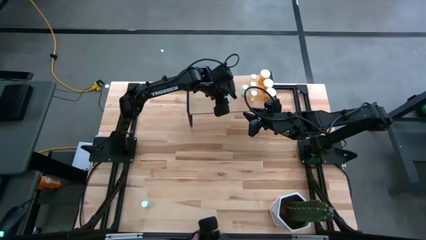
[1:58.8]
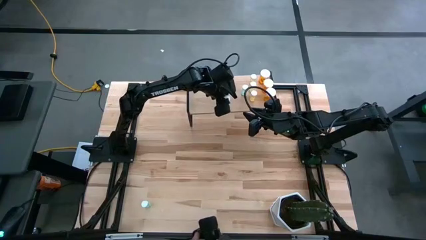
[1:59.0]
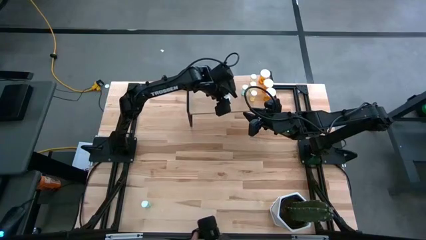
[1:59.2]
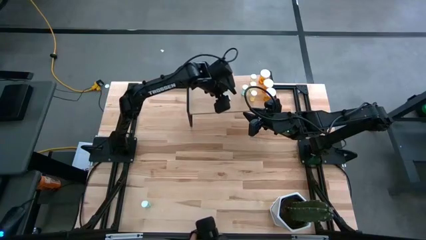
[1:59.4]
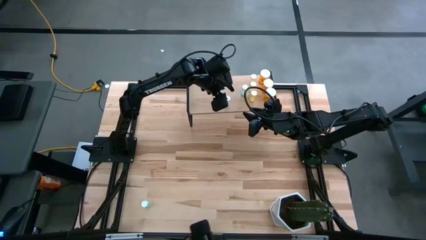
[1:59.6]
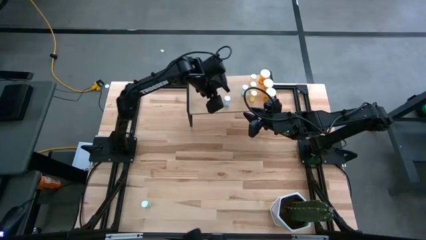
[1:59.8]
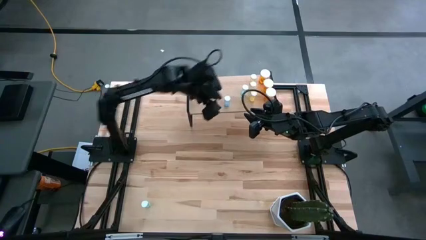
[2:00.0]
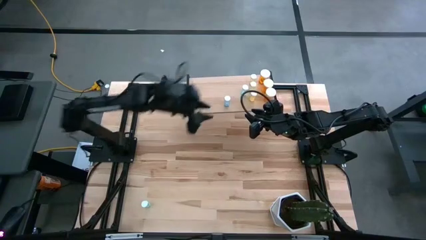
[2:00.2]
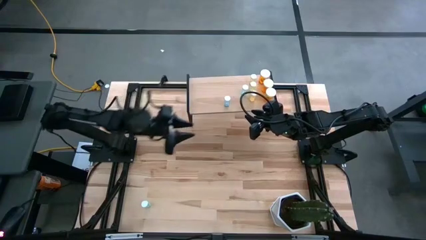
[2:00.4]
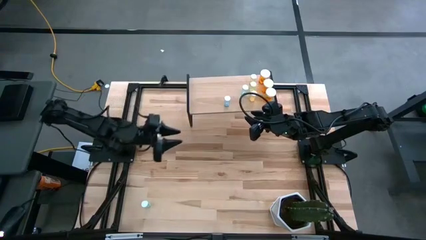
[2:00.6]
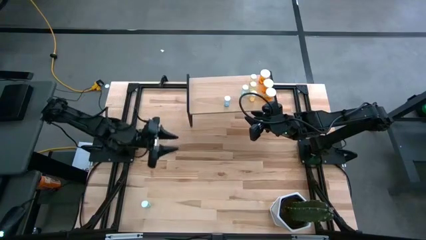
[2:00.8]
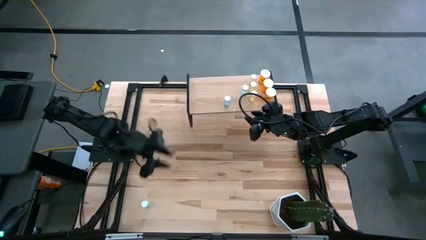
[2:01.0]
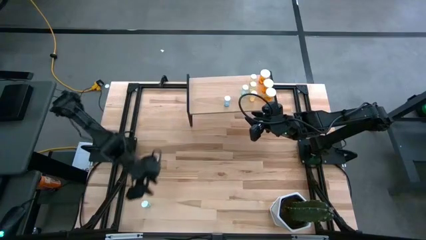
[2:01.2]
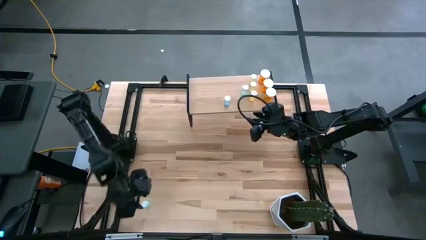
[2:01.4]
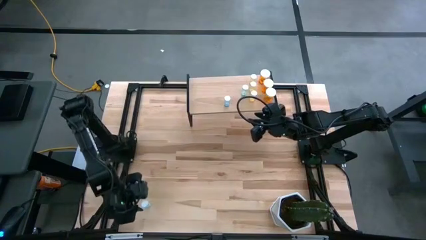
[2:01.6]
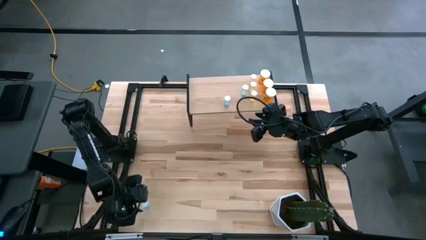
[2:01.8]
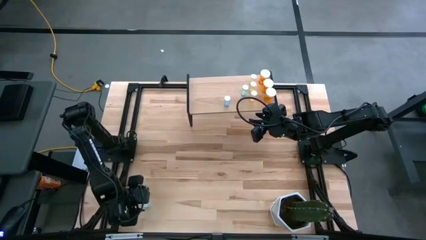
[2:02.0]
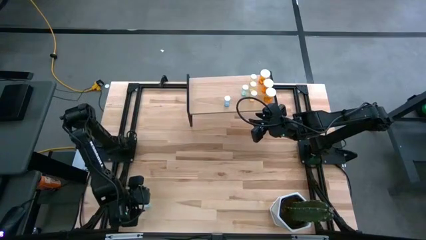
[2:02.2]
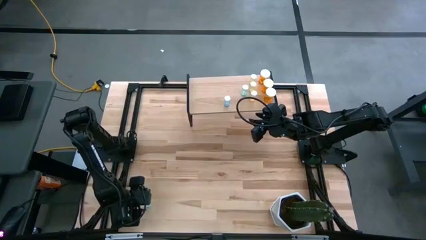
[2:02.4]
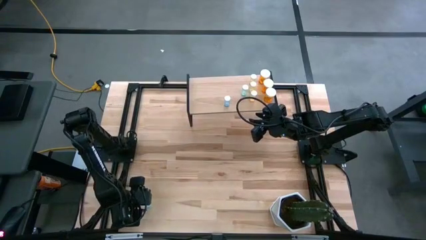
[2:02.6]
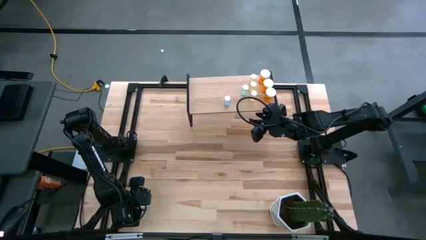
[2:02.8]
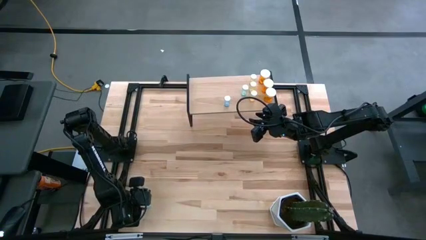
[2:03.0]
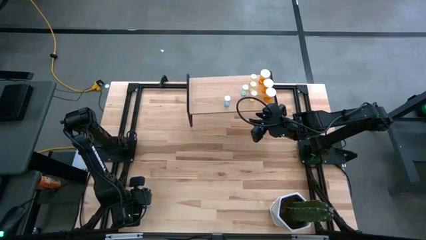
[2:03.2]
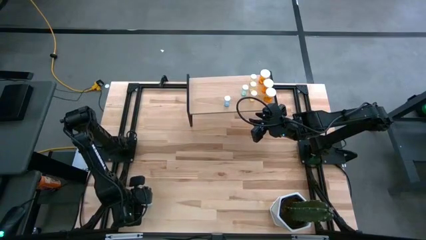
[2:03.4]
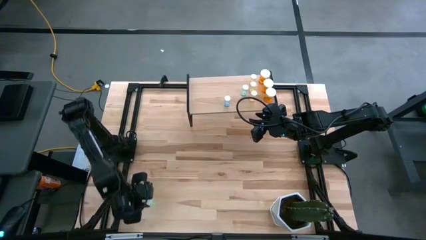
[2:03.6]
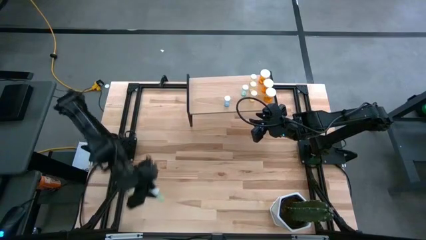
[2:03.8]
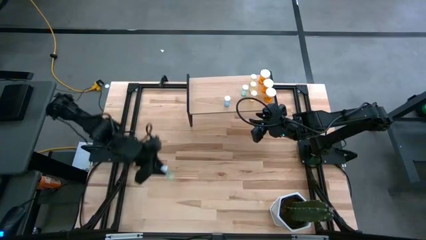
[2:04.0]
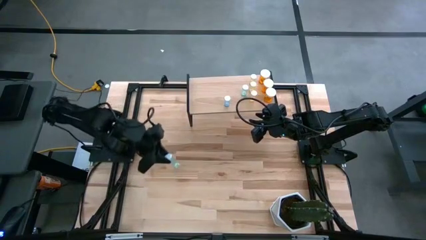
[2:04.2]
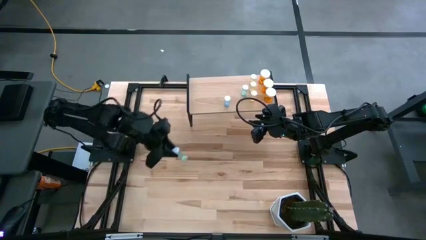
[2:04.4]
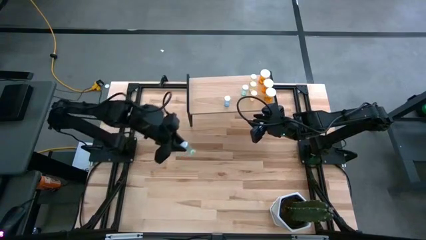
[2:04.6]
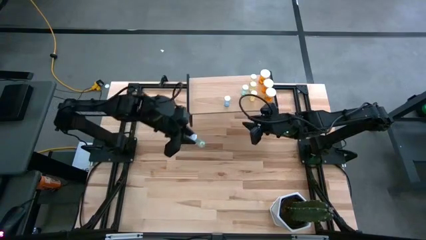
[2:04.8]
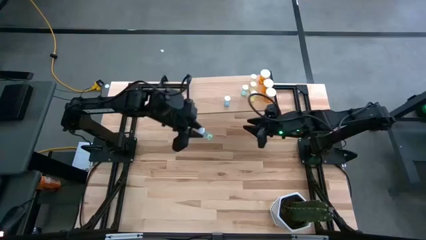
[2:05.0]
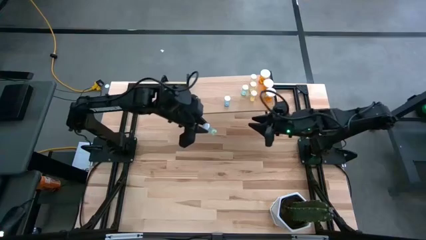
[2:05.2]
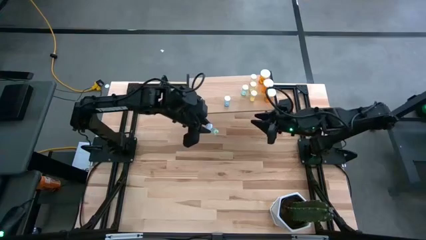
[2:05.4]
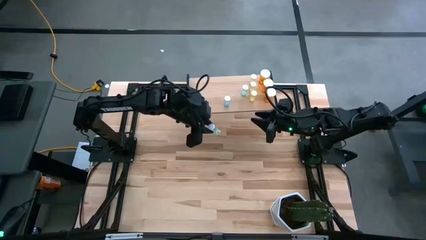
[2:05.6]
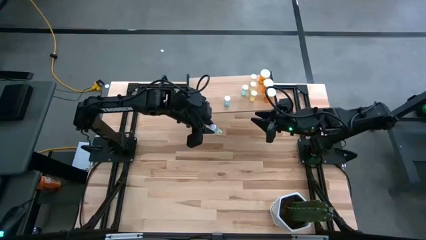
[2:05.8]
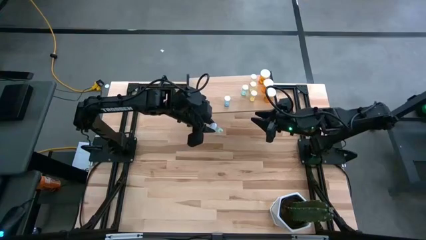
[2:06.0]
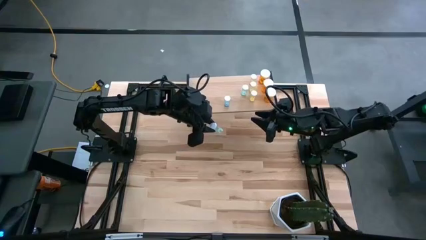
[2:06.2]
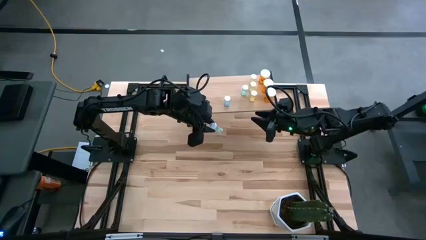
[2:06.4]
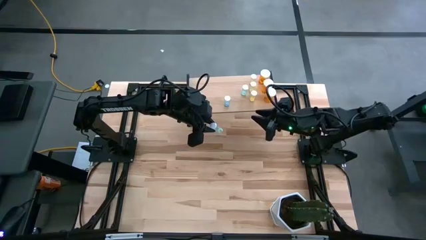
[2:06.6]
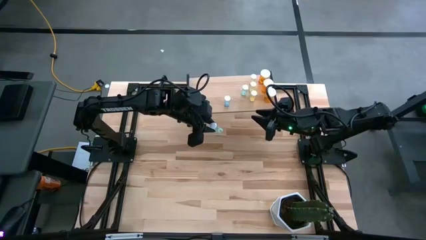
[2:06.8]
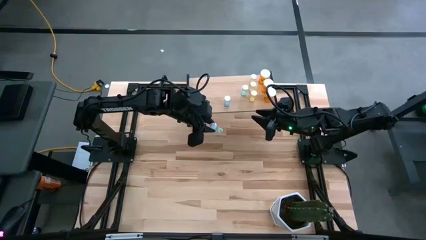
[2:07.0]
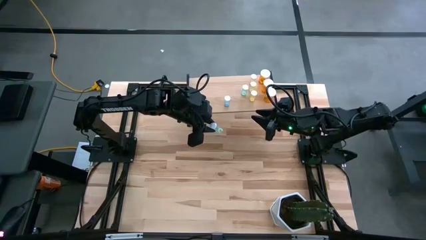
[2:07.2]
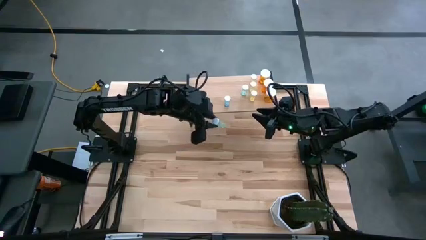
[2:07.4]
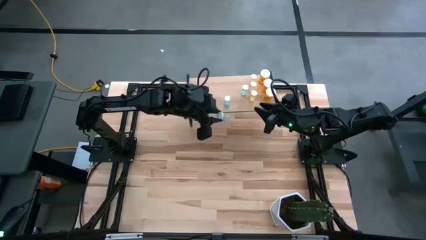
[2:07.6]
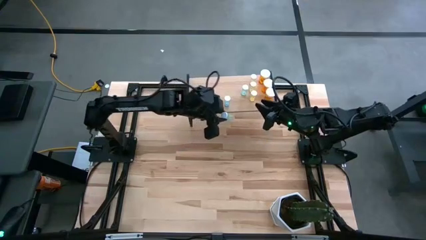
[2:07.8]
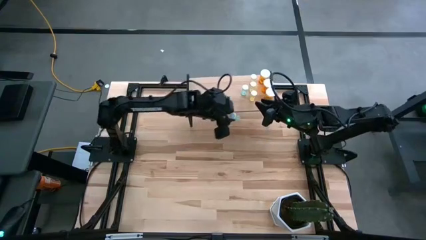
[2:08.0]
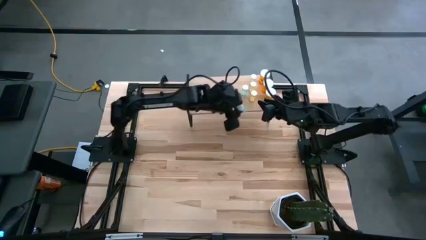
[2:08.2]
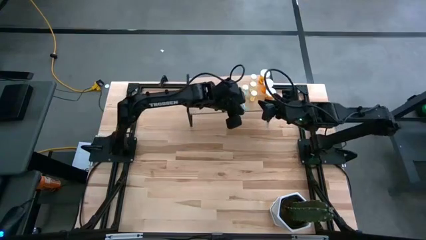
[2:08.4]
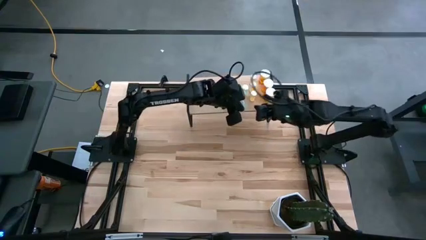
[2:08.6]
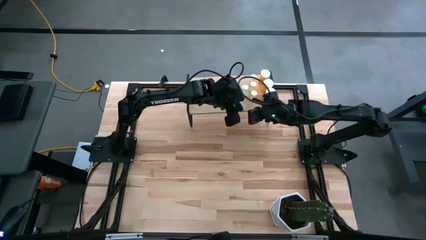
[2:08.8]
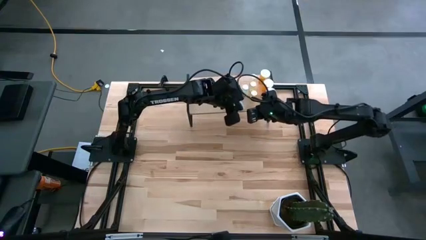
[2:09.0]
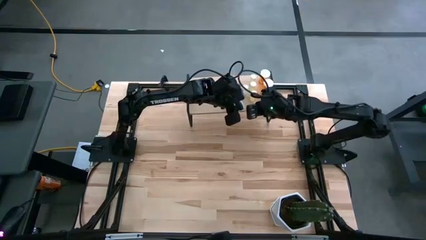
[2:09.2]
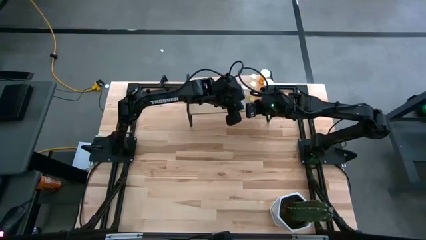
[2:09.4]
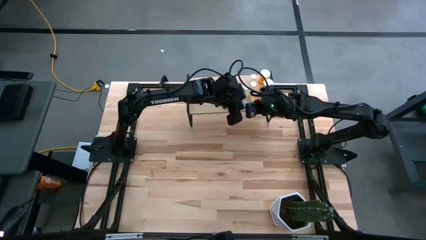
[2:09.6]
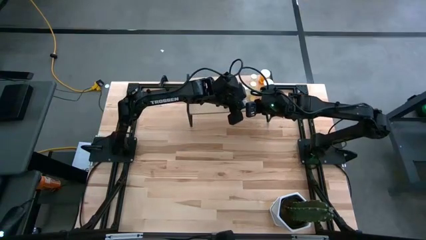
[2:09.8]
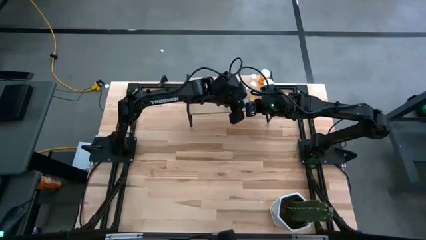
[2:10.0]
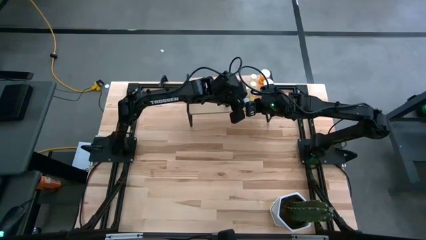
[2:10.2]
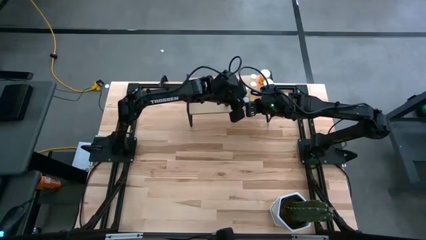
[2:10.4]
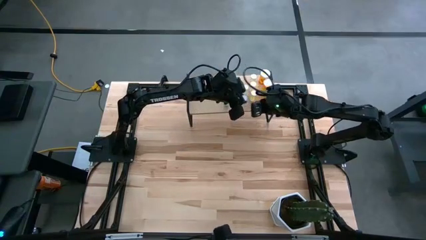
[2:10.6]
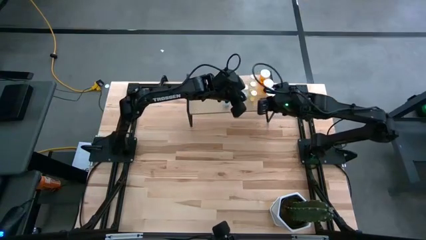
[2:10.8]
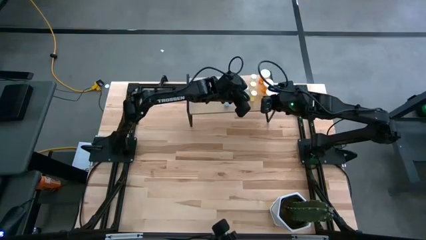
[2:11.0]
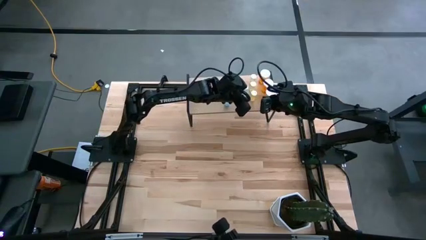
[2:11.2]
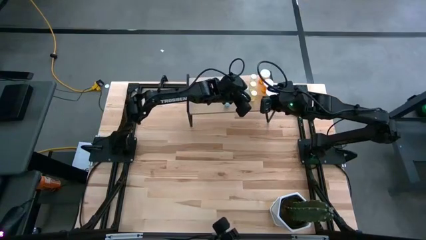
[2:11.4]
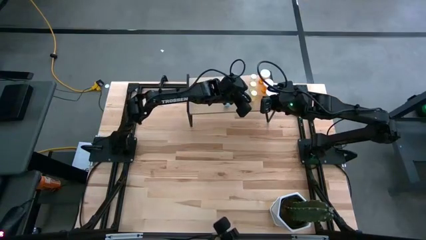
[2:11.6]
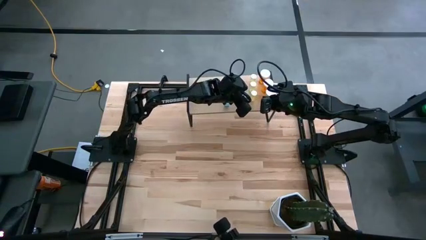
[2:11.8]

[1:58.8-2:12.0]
Task: Pick and place medicine bottles onto shelf by color
Put the green pill bottle on the shelf with the green pill bottle

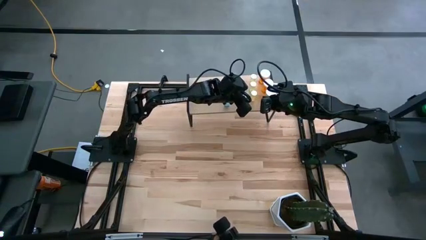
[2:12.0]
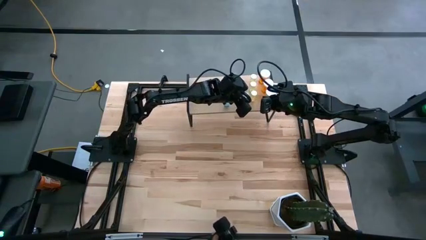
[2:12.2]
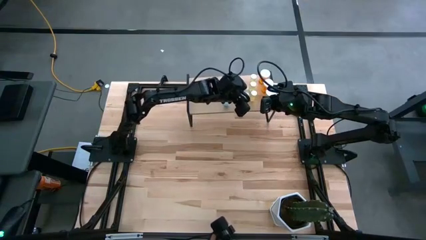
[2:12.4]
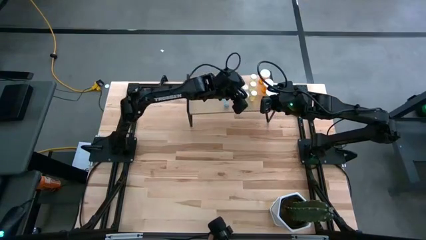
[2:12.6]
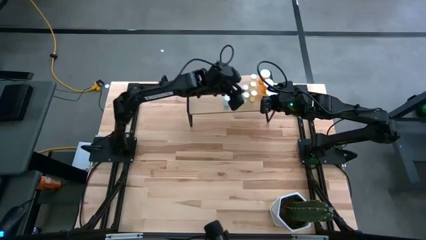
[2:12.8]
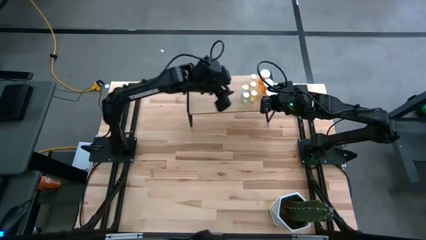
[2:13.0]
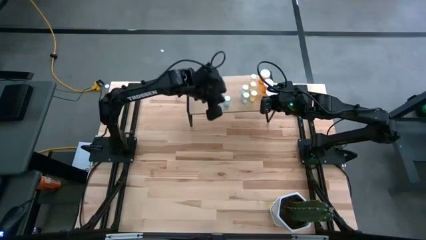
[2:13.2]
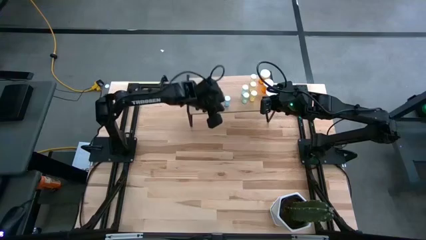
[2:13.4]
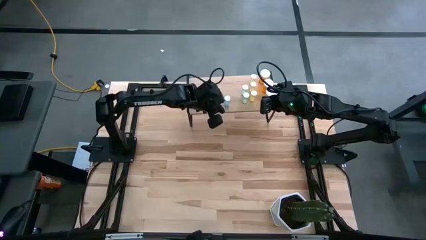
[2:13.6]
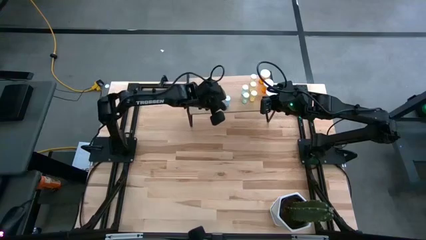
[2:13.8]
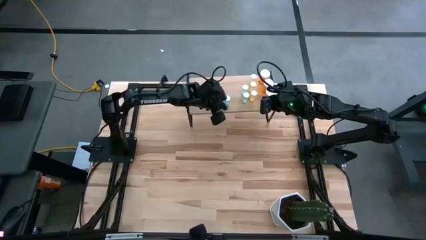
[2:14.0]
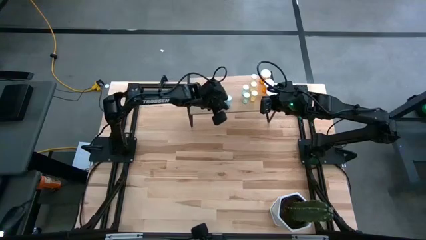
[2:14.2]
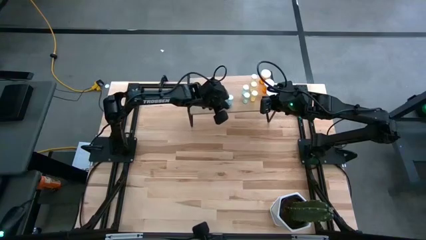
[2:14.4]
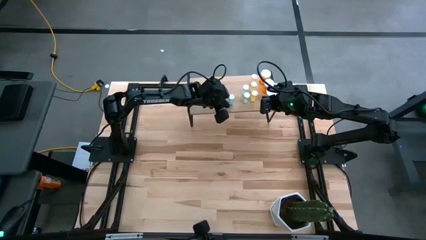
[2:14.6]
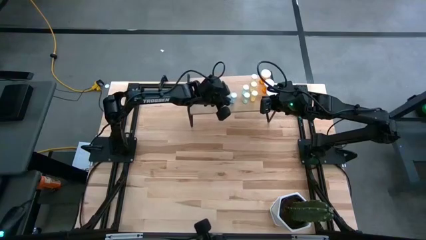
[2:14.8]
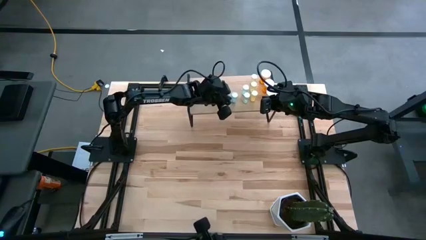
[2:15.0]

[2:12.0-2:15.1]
Adjust the blue pill bottle on the shelf
